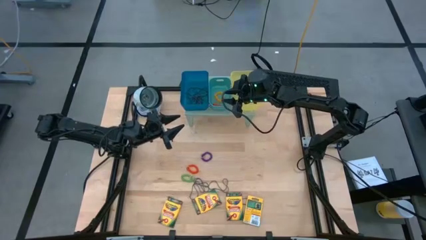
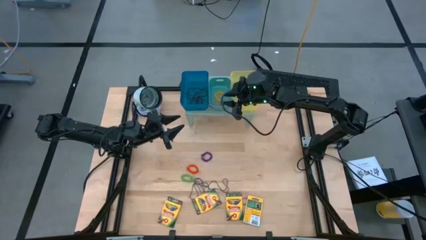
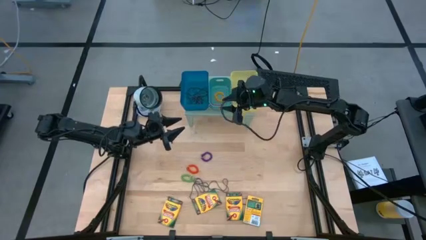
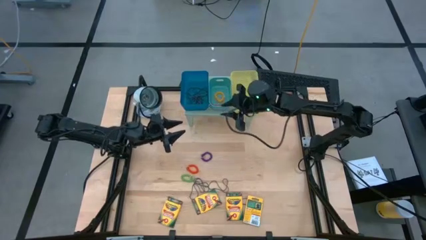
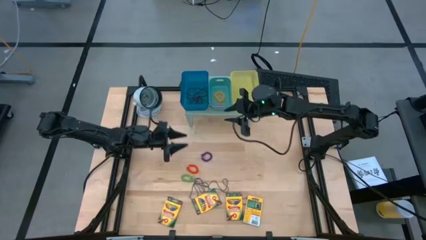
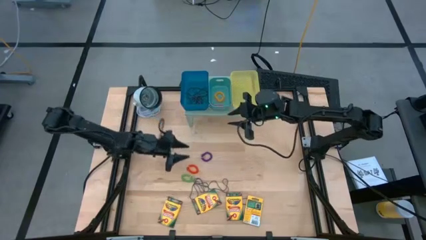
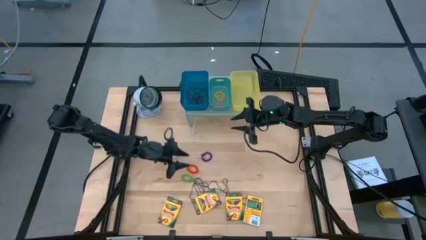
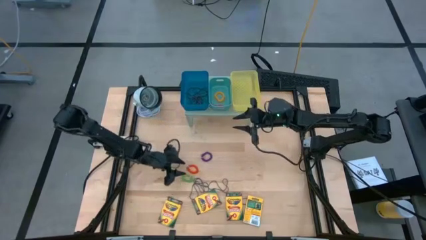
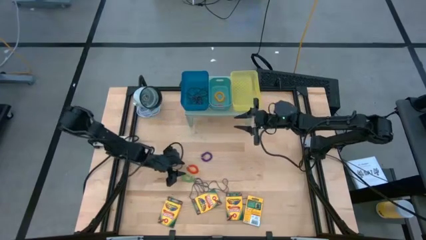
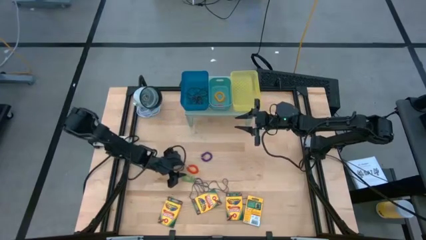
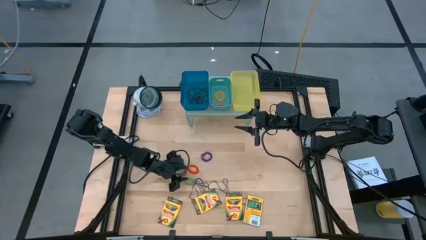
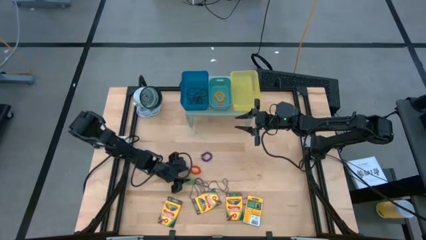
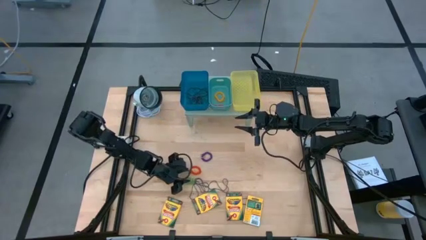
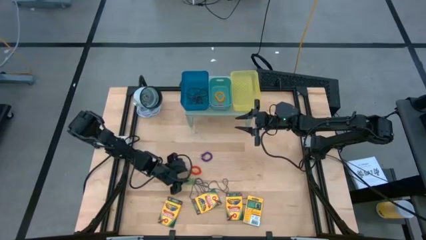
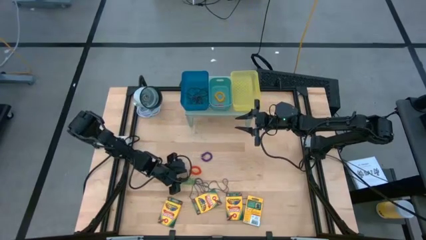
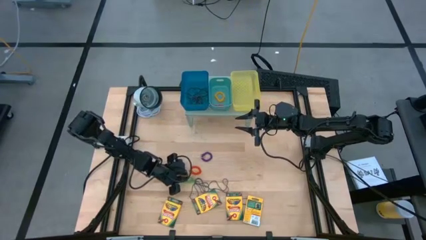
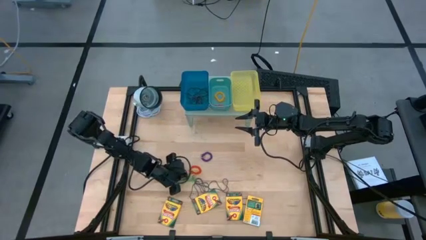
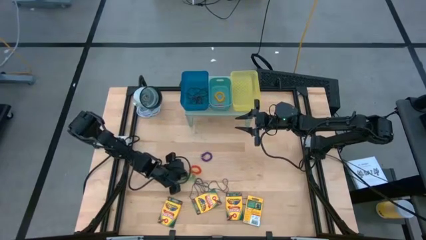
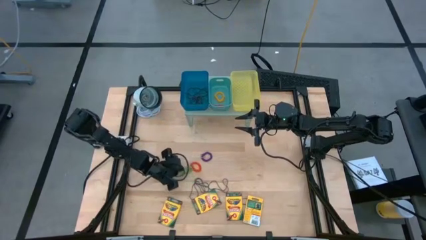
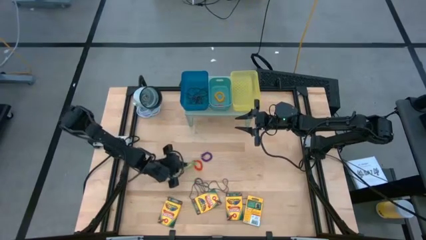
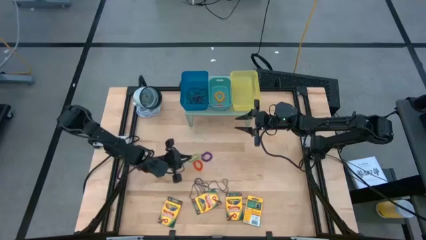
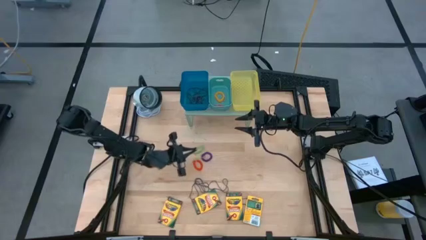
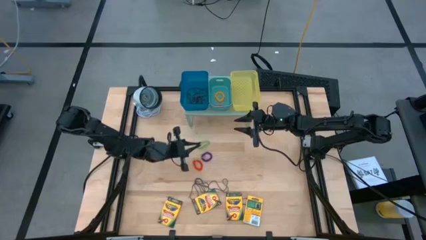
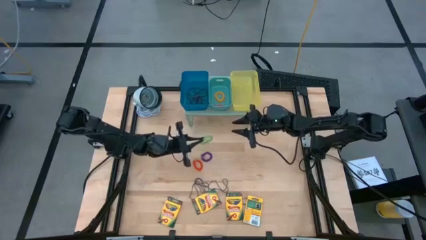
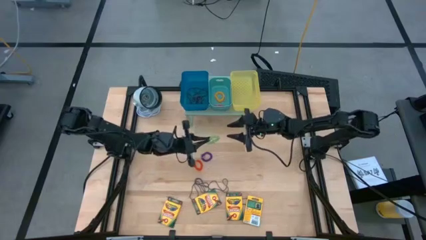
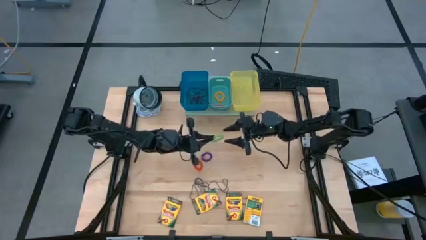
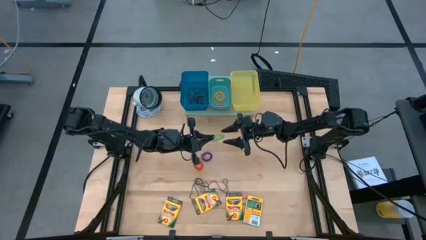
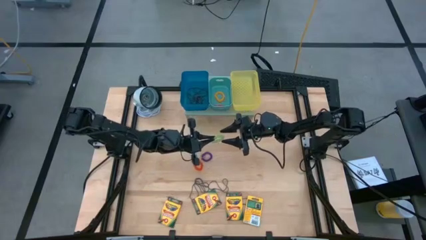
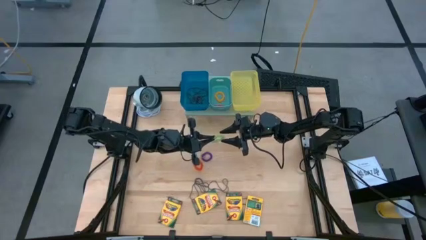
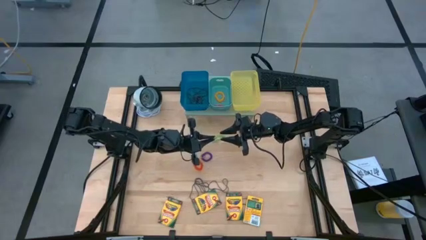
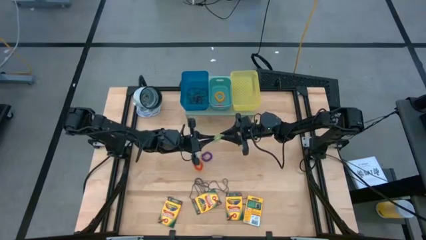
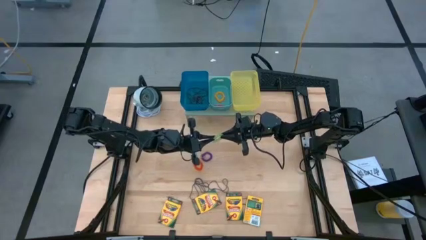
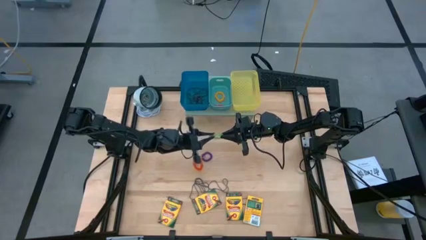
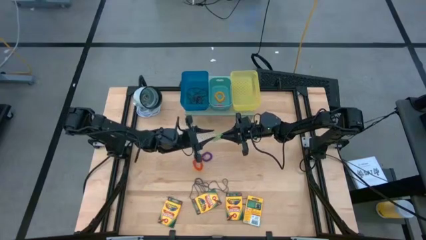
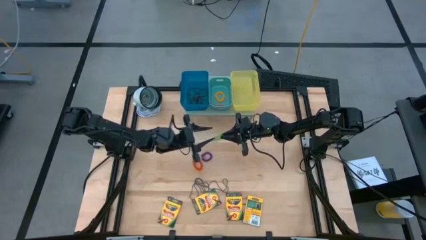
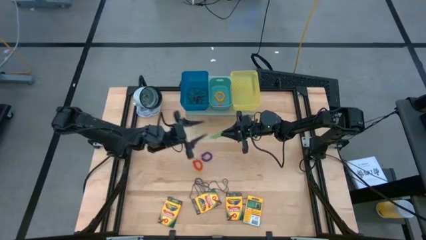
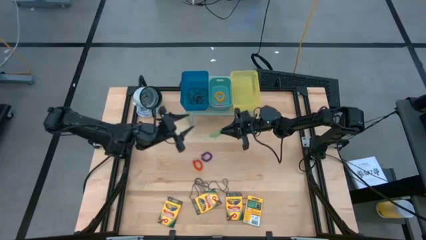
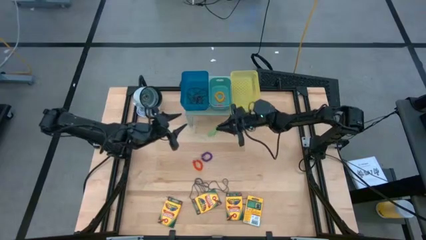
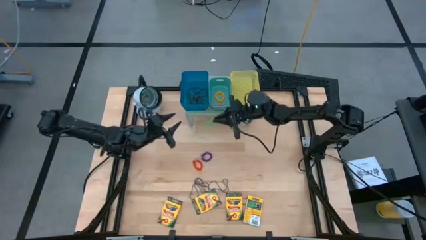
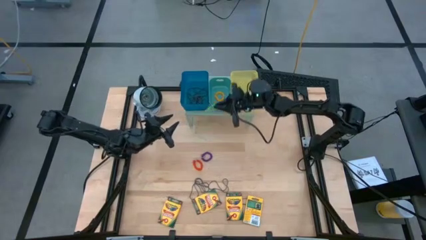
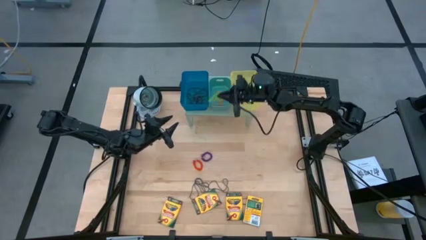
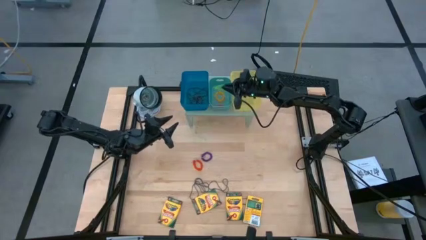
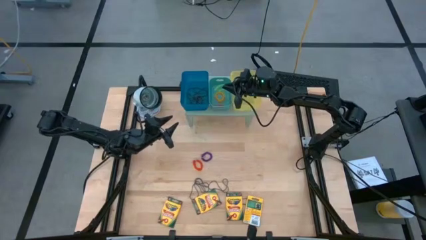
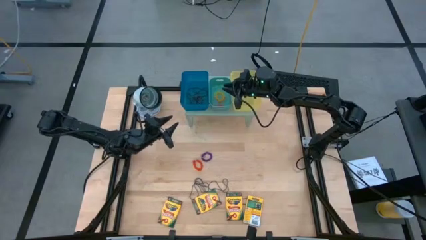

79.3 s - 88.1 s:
Task: Pick & Place Office Desk Supplies
Put the green spring keychain into the green bin on the shelf

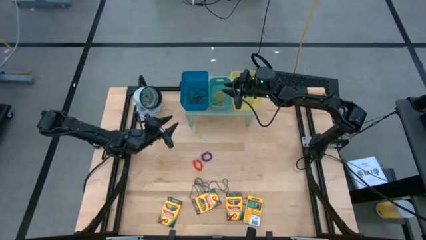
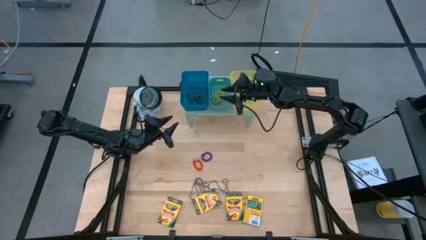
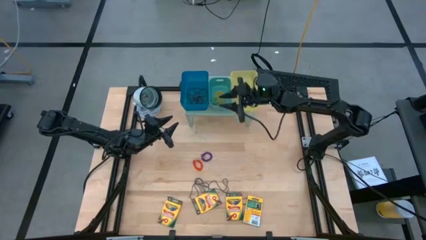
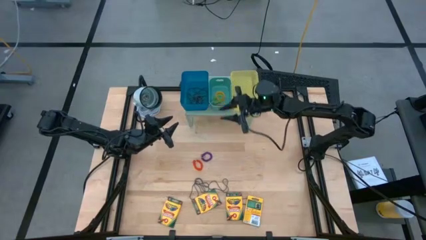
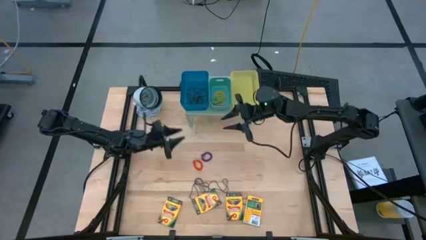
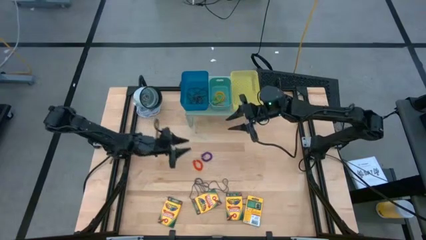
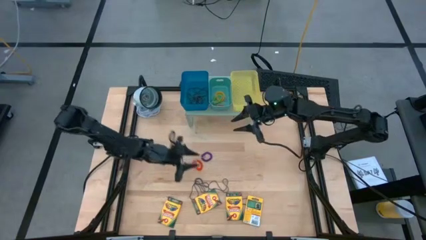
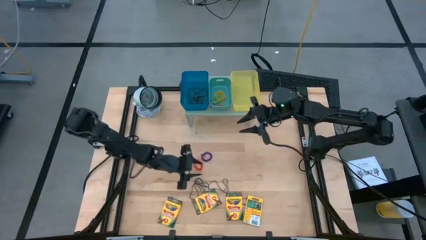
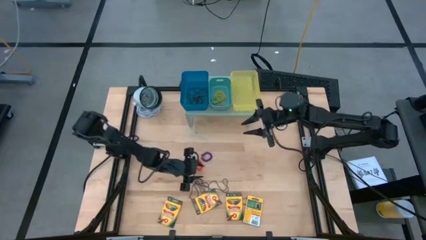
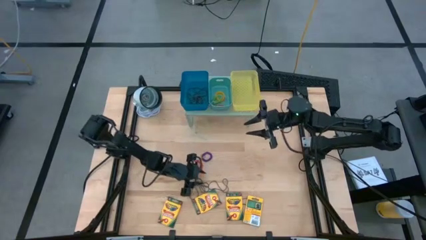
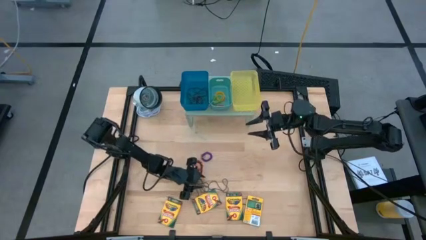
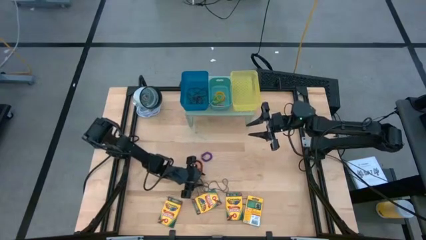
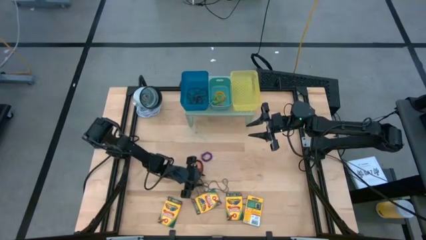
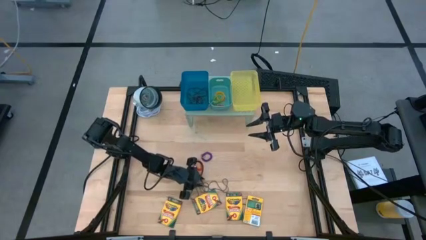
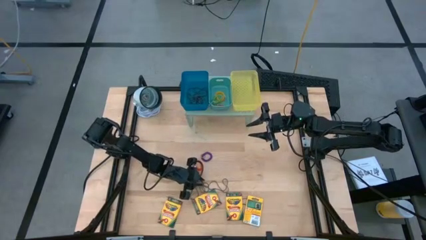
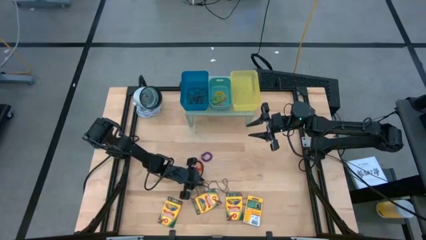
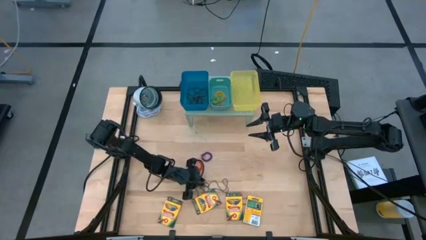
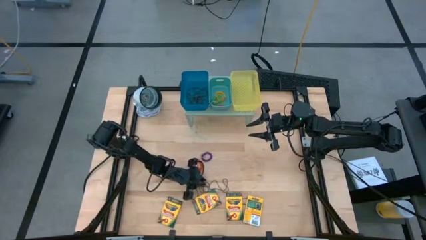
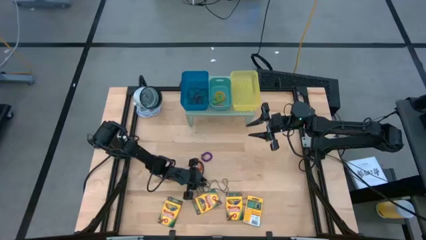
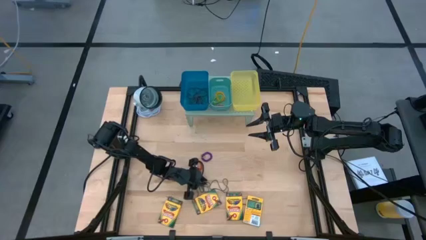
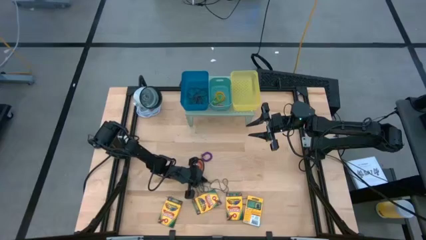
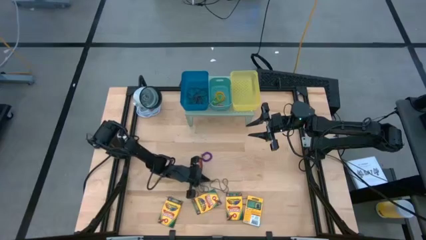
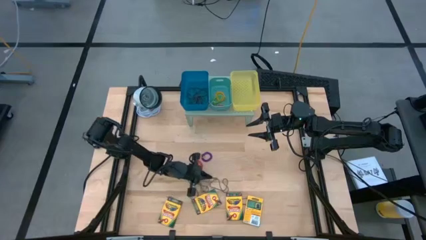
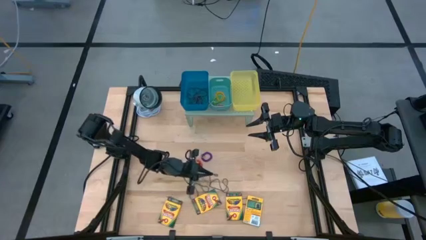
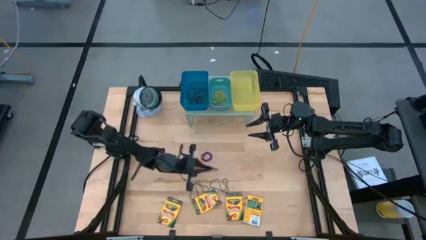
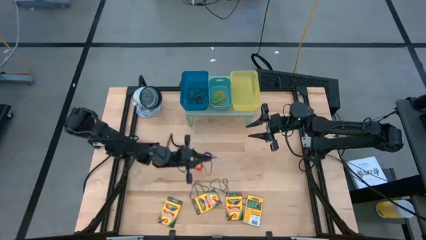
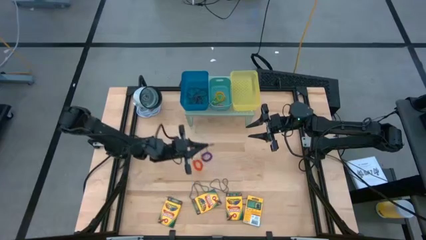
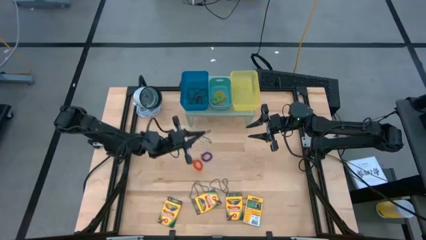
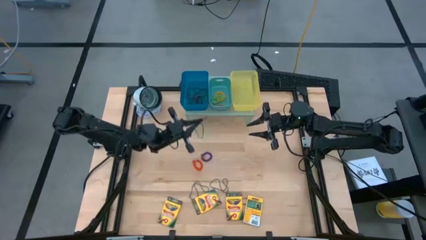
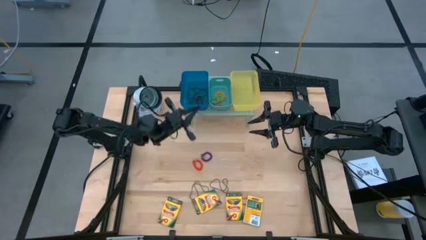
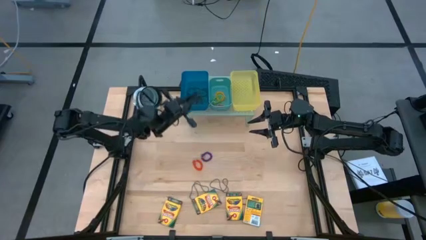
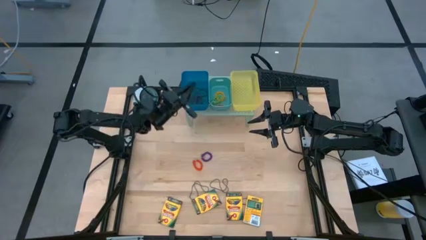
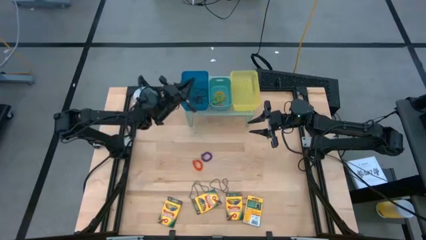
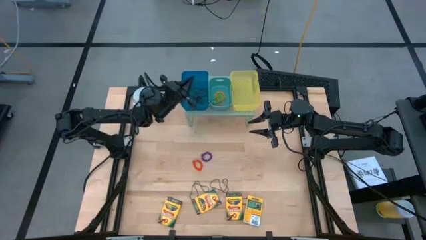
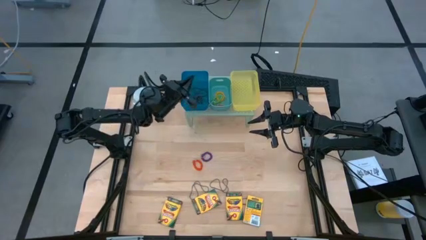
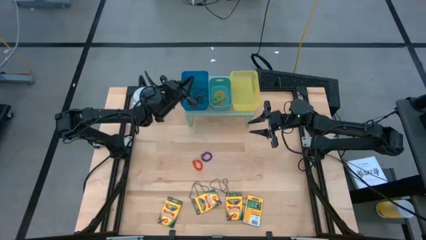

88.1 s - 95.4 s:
Put the purple rubber band into the blue bin on the shelf
